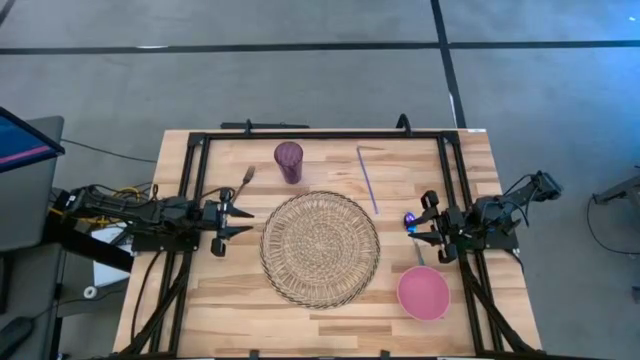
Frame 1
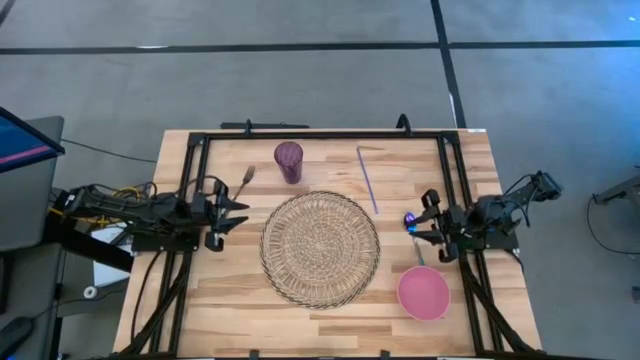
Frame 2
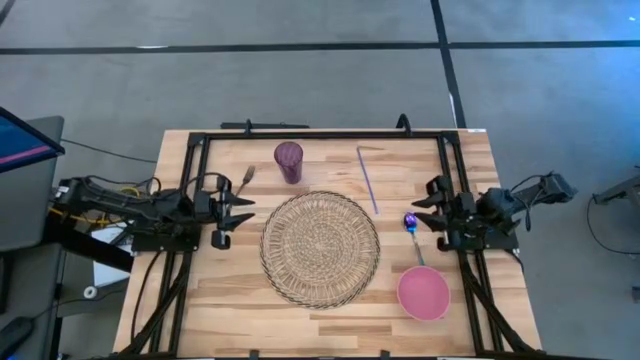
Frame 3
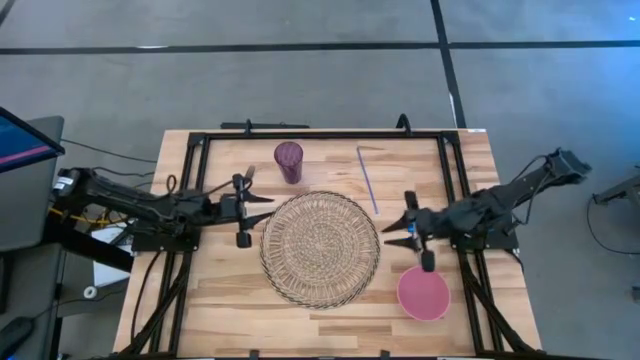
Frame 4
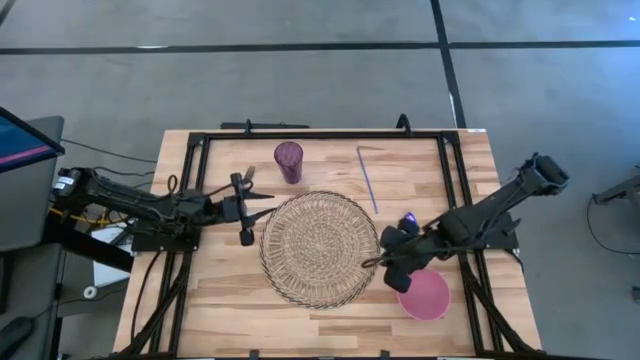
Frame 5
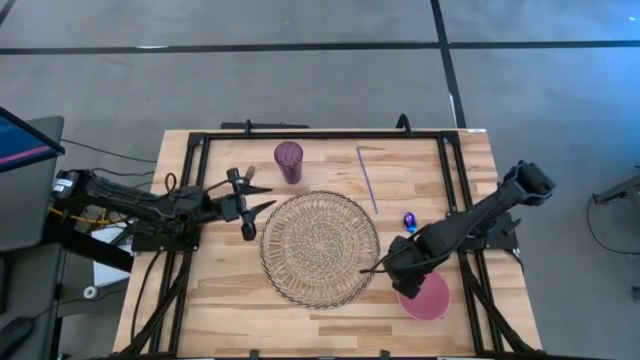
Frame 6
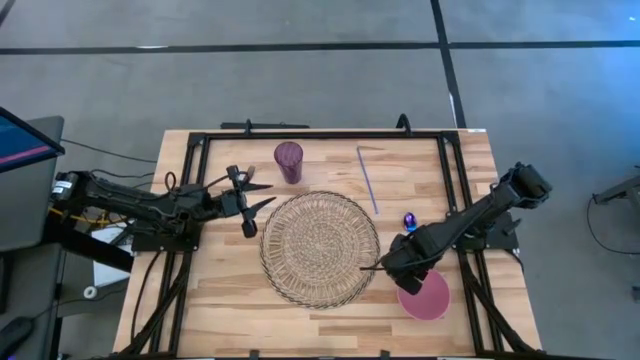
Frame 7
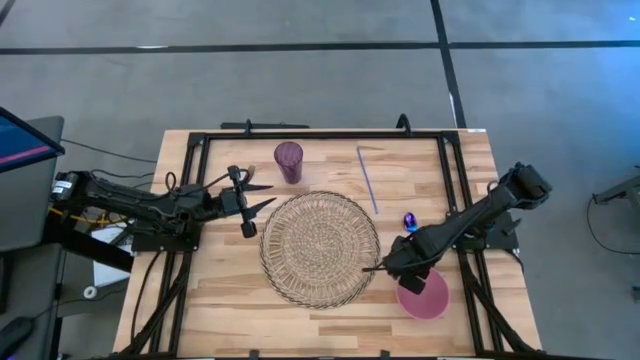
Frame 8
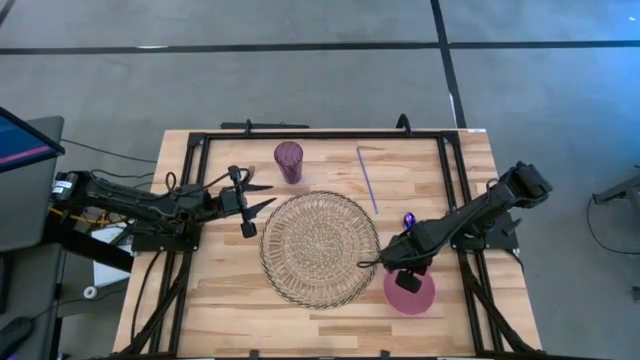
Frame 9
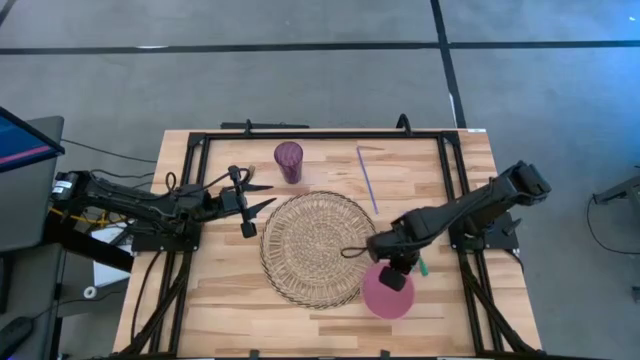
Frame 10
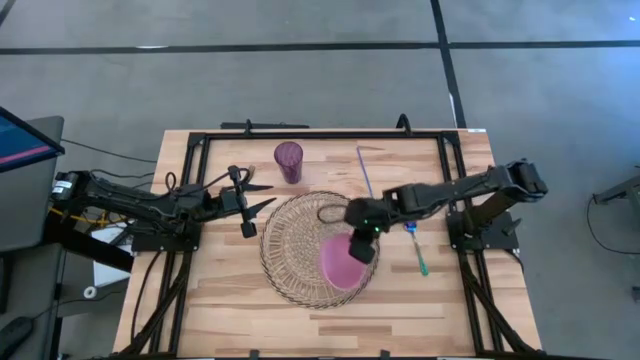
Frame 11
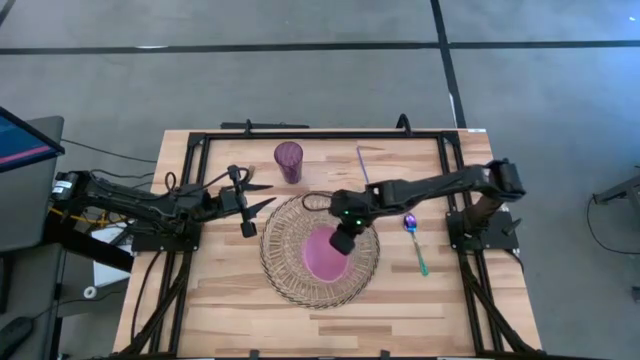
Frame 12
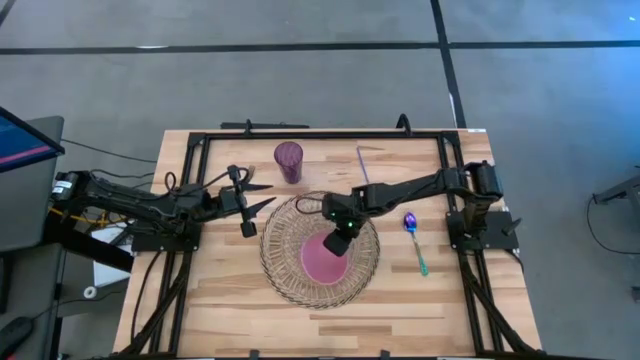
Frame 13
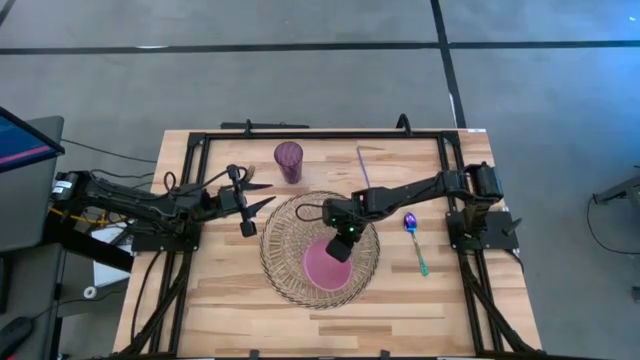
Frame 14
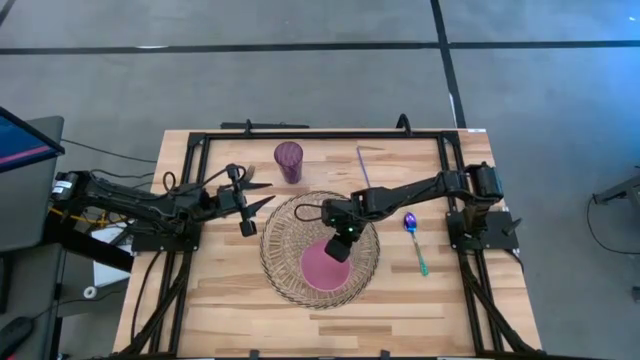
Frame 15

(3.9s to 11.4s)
Task: Pick & Place Utensil
Put the pink bowl on the brown mat

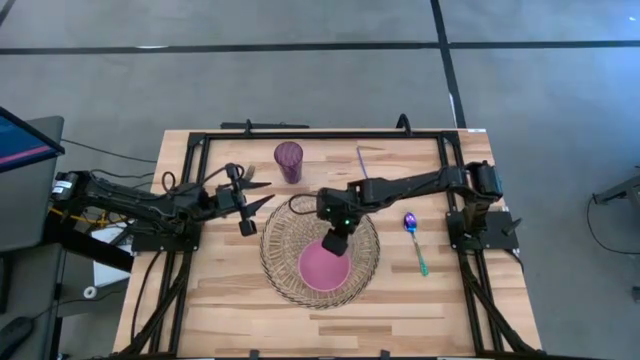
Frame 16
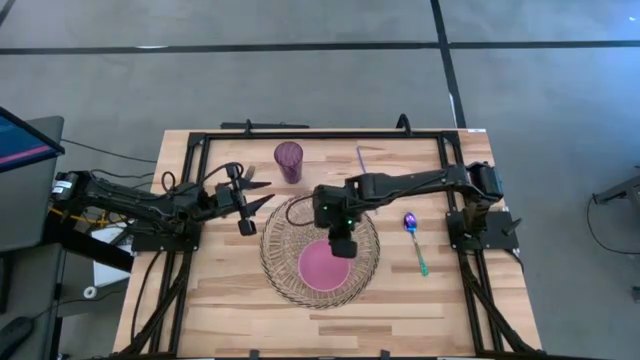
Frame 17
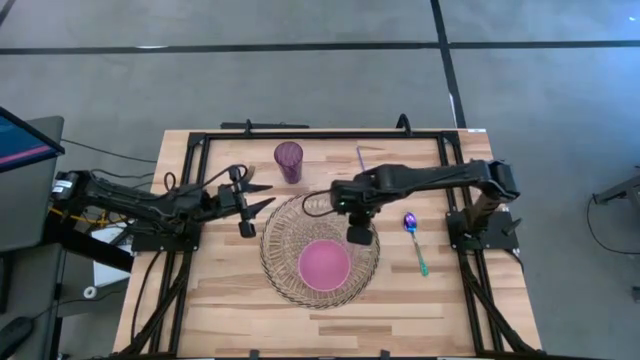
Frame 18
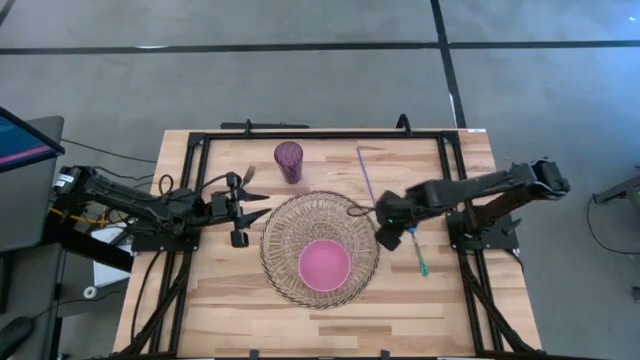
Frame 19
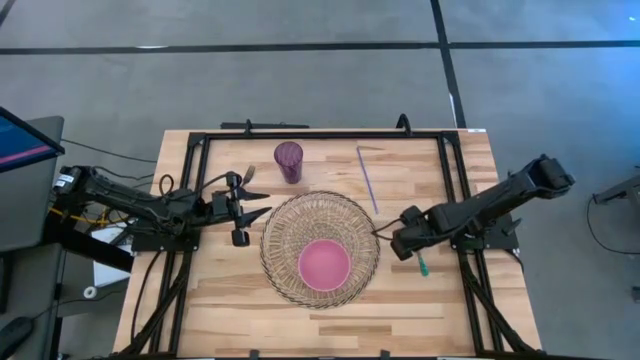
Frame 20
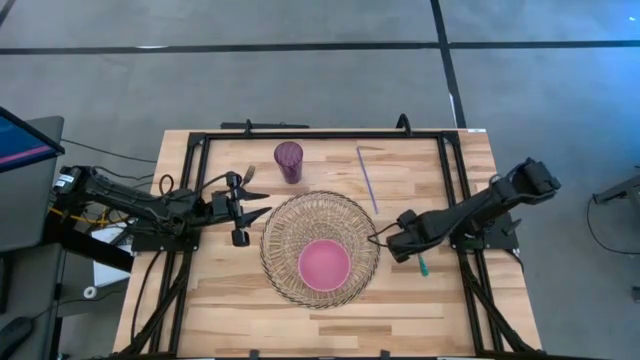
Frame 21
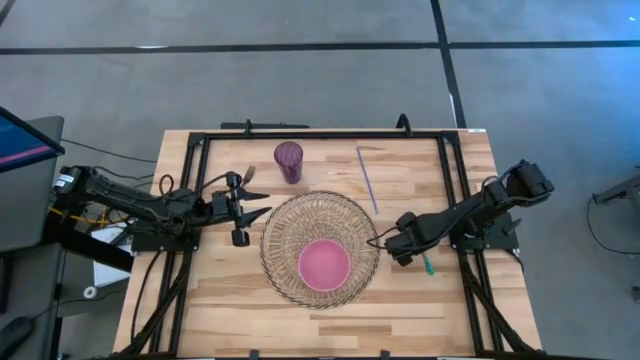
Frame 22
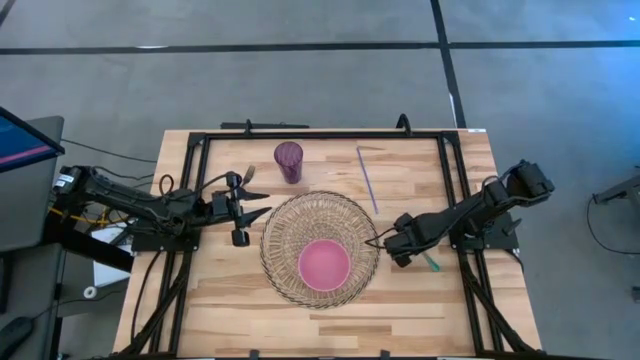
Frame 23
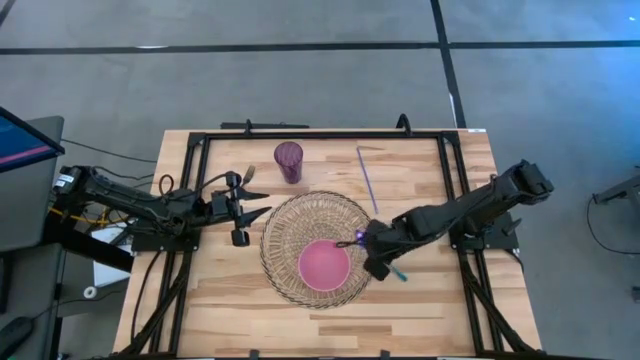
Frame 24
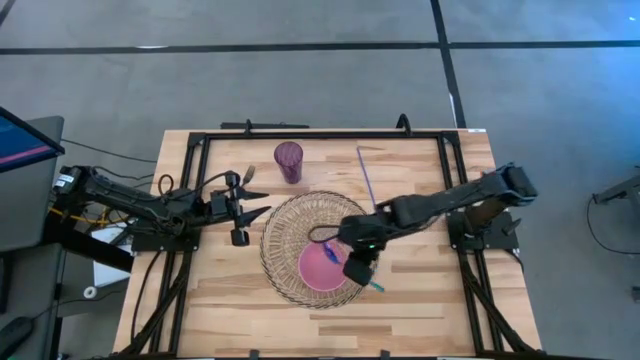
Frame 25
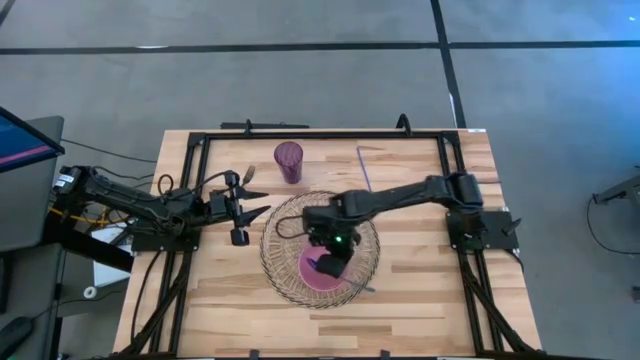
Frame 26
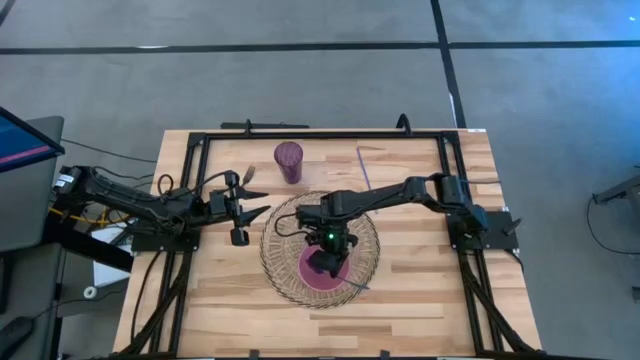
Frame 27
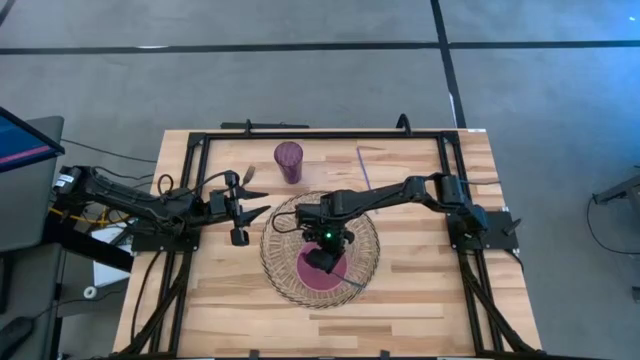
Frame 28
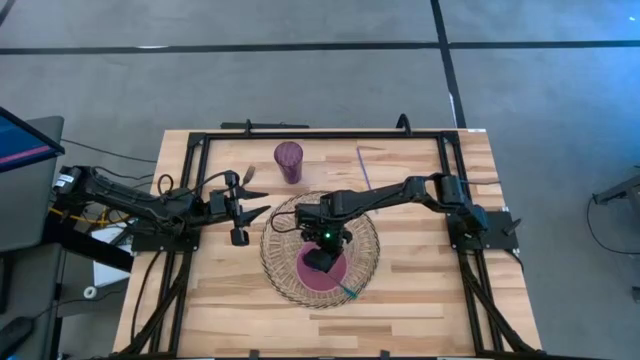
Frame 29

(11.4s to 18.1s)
Put the blue spoon into the pink bowl

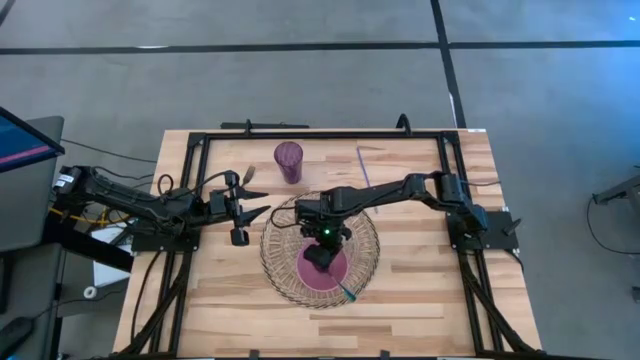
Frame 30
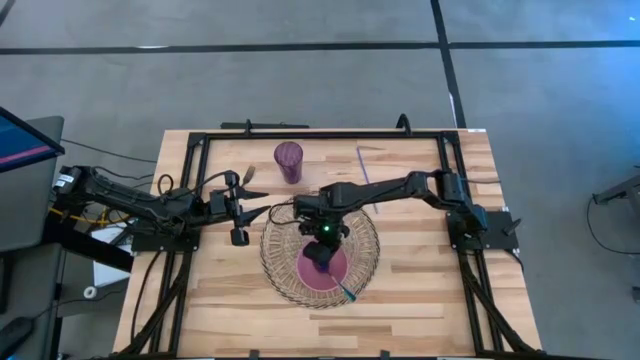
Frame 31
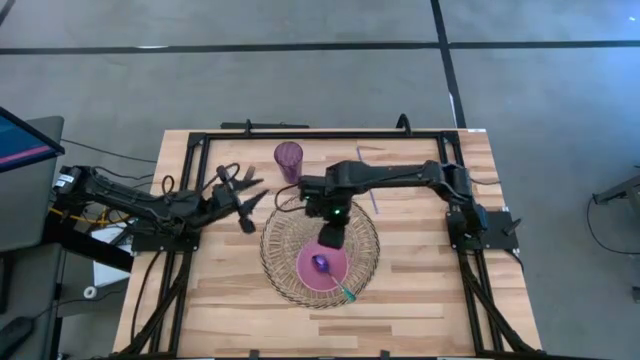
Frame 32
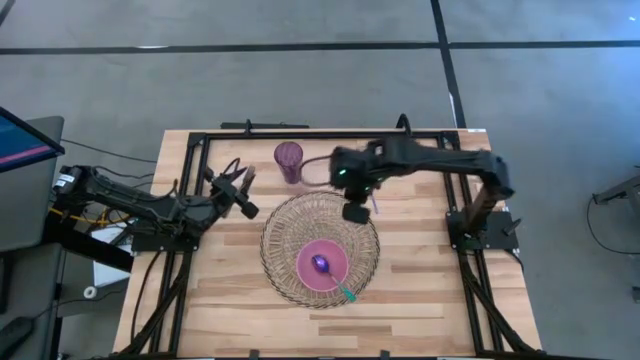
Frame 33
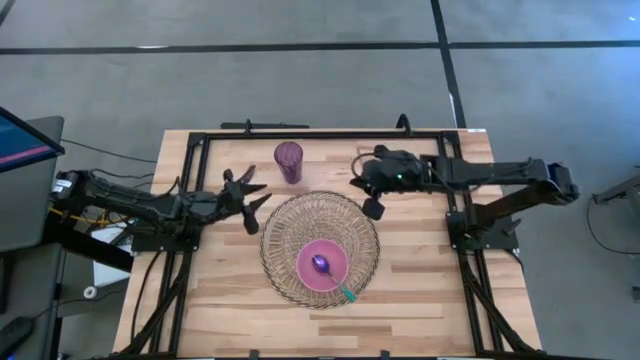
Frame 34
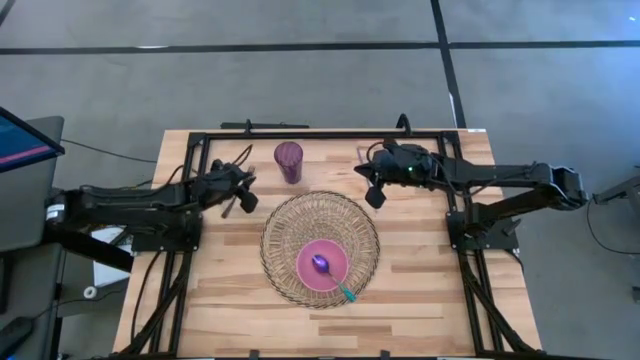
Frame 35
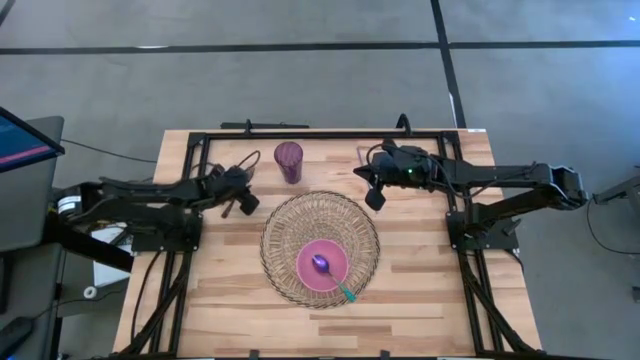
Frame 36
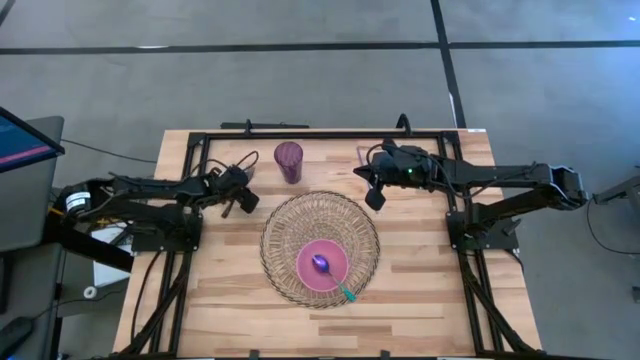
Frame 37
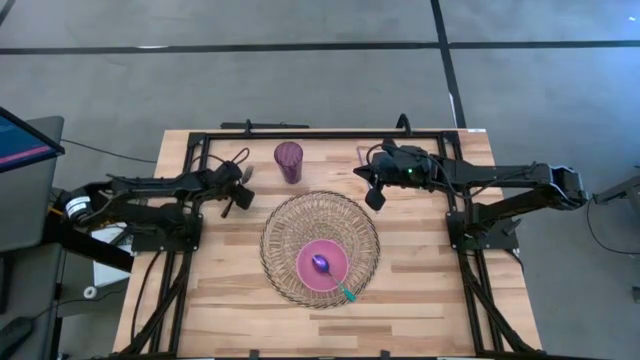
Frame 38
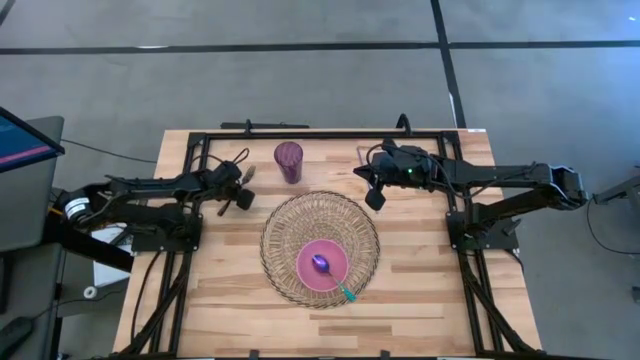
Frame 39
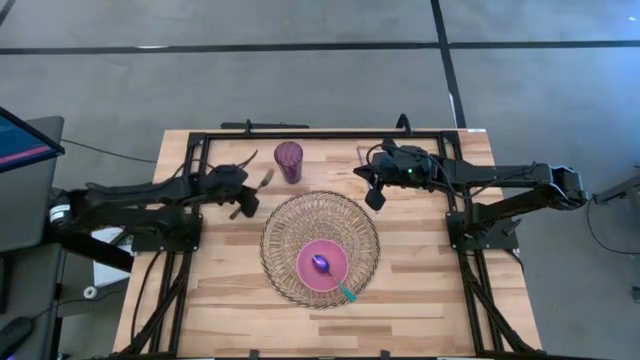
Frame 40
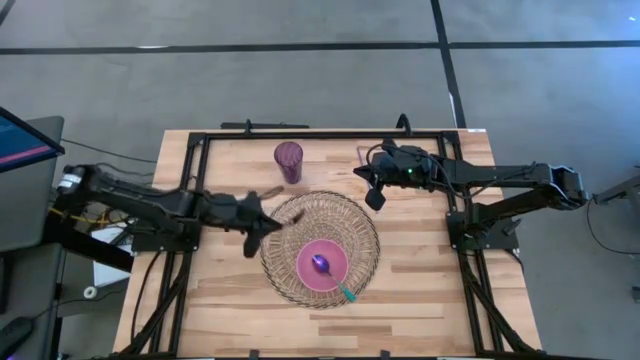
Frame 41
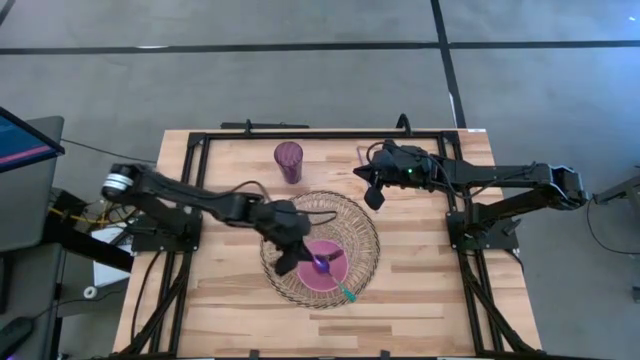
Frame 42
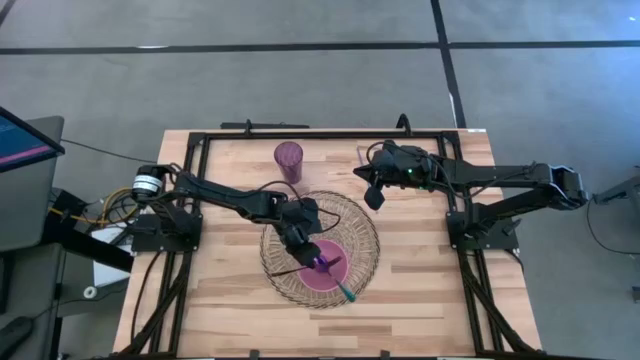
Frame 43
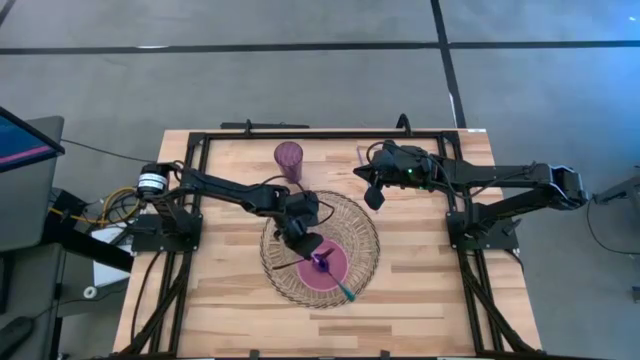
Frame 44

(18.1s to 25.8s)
Put the black fork into the pink bowl
